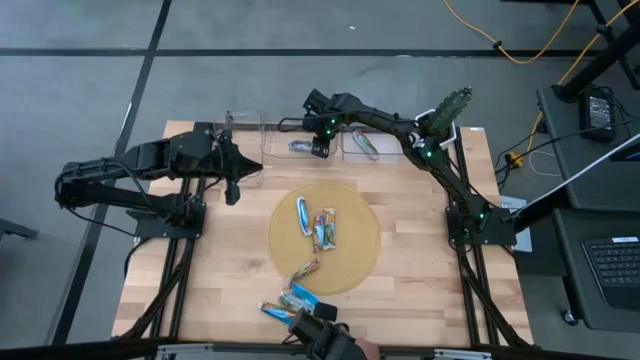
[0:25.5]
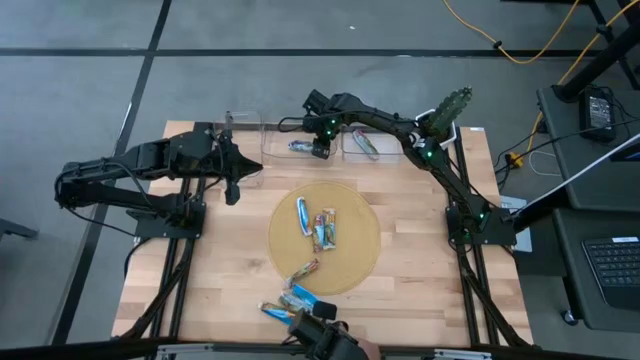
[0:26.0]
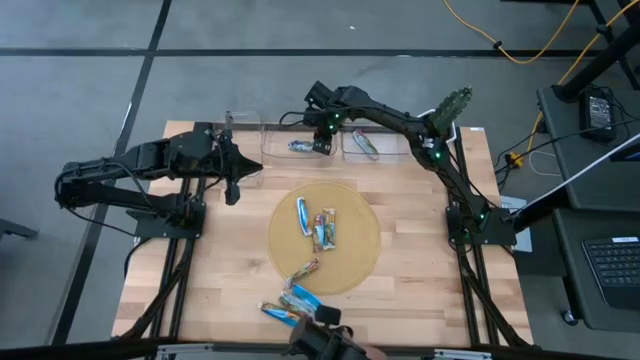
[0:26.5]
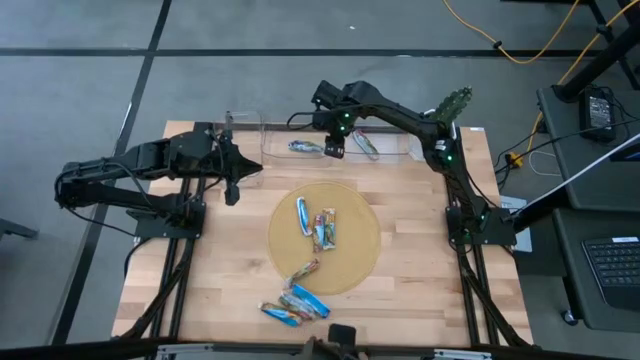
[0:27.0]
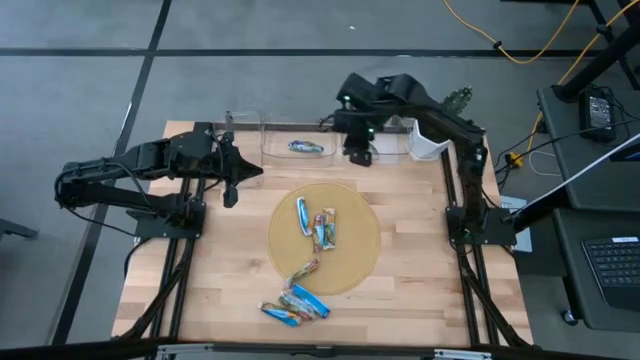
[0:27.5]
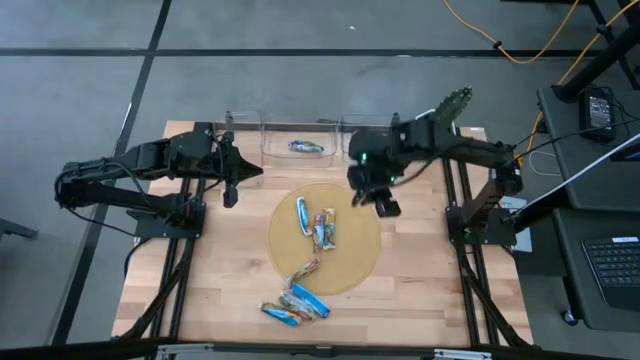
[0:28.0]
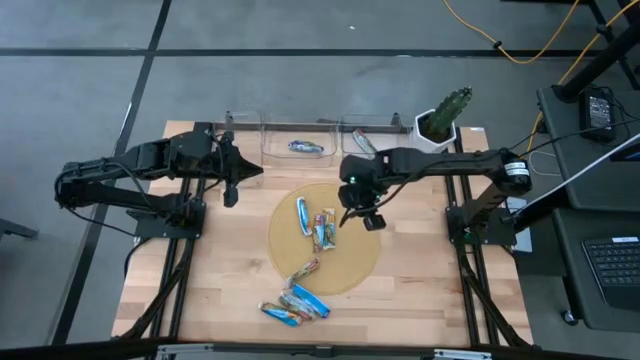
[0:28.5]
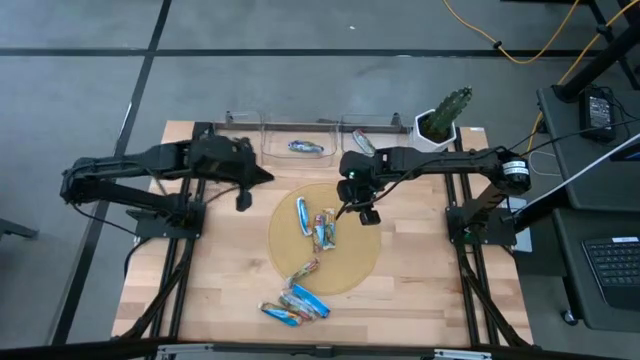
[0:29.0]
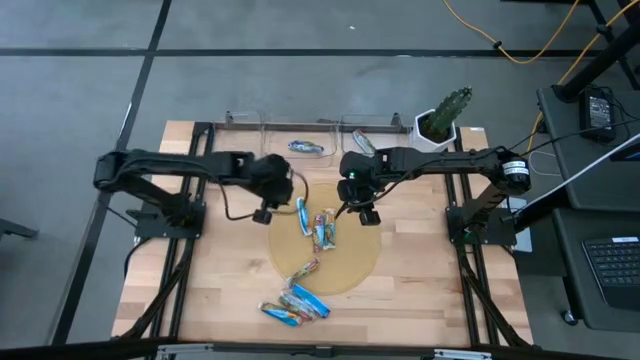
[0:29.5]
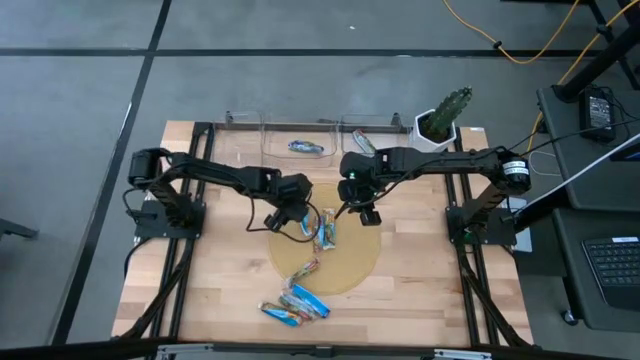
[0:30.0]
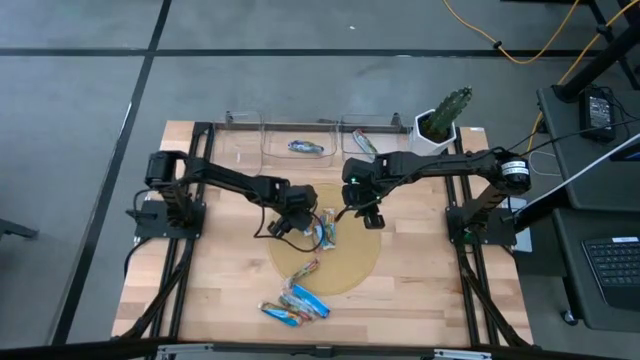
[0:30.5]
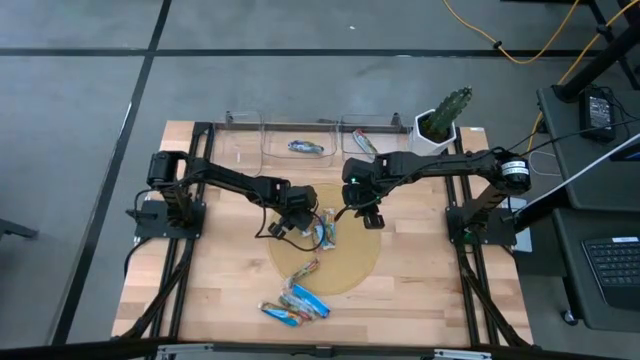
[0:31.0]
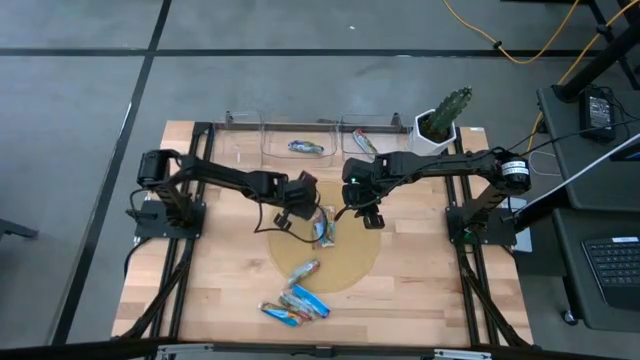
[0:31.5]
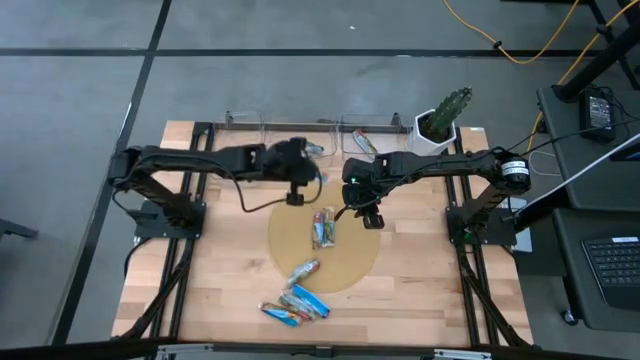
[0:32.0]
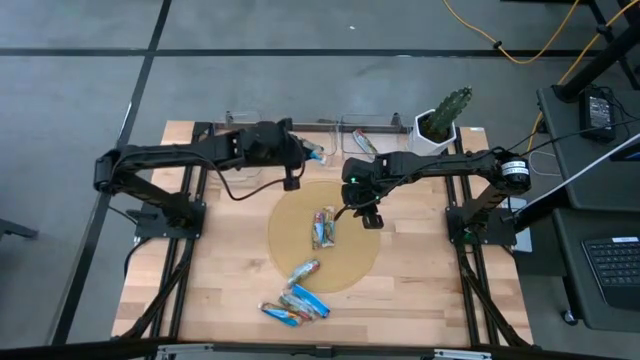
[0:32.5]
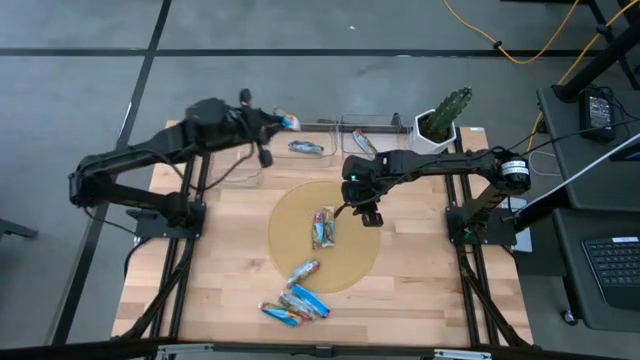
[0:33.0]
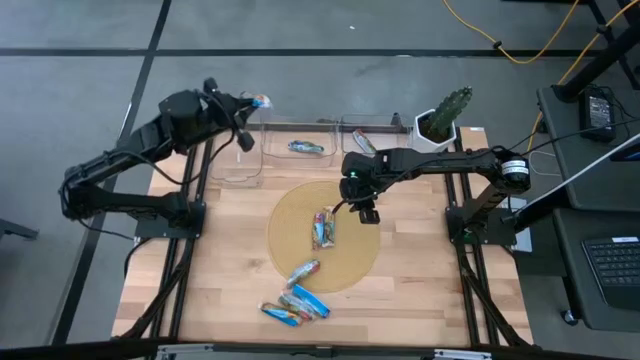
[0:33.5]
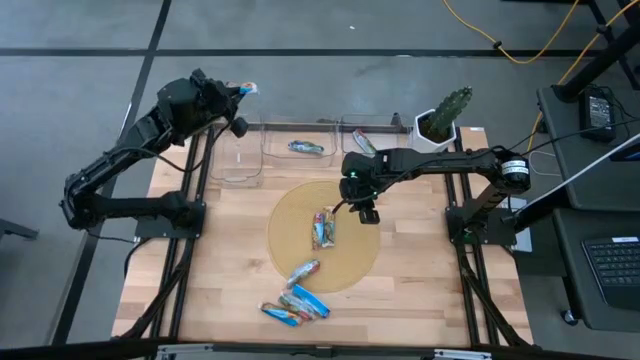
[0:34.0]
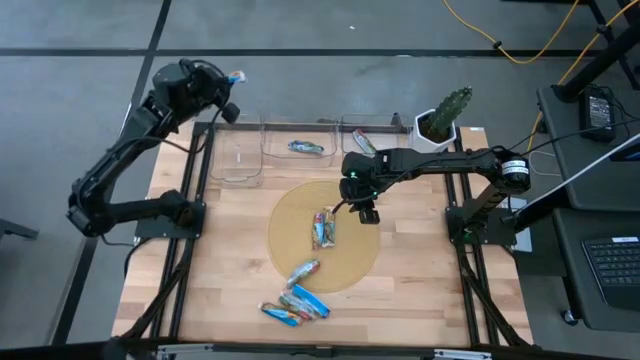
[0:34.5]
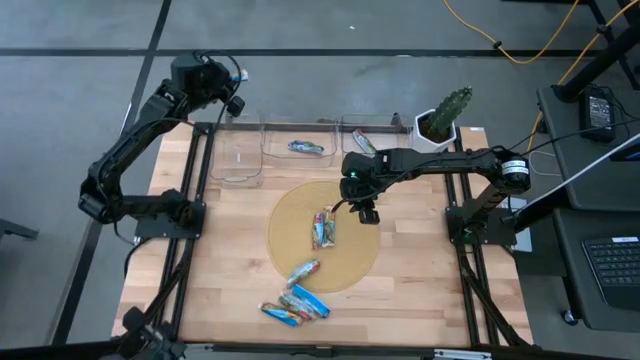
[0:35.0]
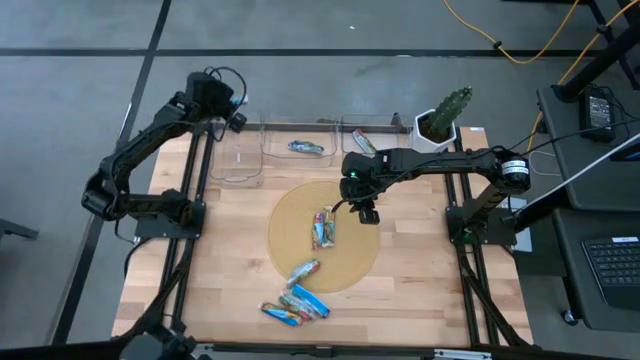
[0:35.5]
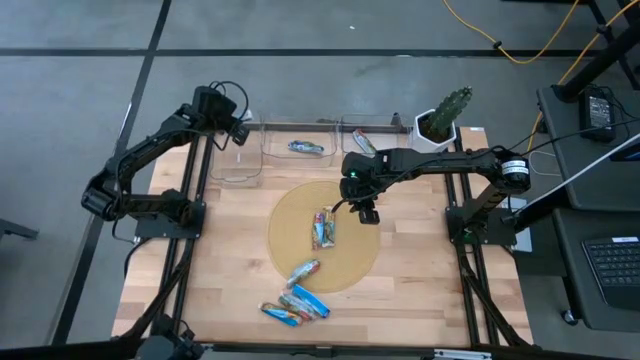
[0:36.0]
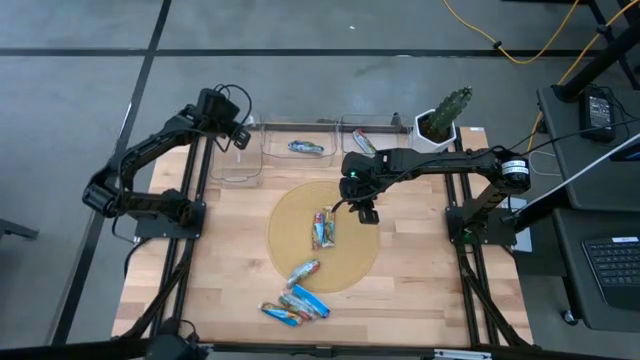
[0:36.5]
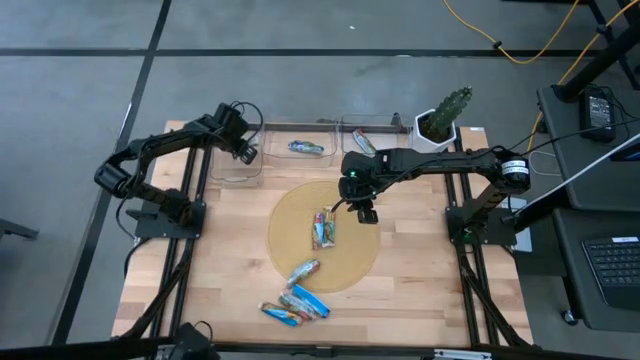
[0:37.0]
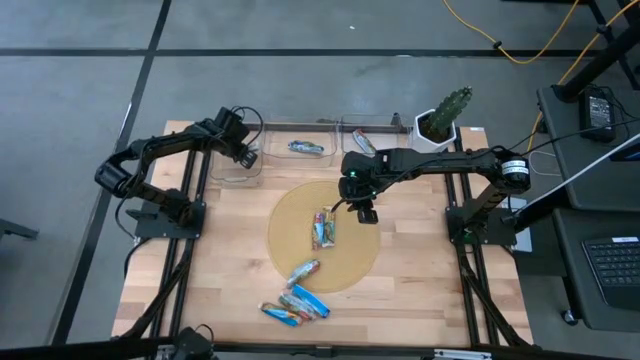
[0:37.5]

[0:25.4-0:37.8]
Task: Pick and place Granola Bars by type
Put the yellow granola bar into the left transparent bin
